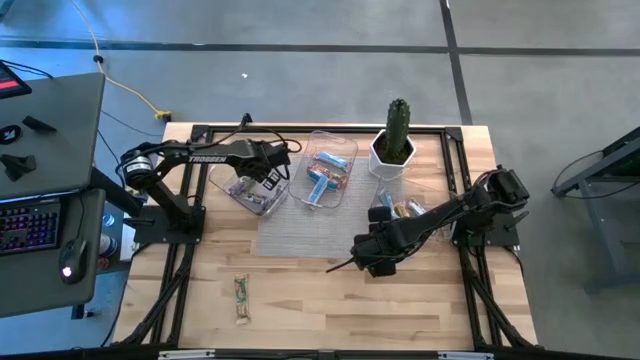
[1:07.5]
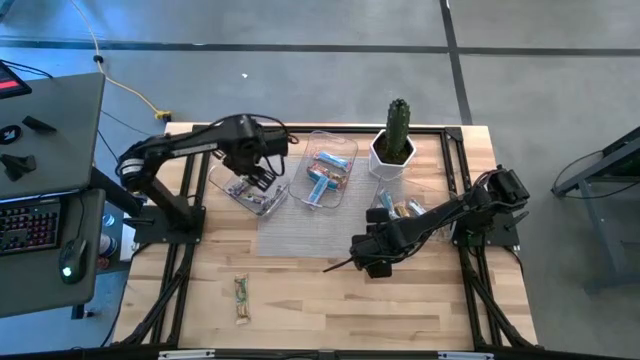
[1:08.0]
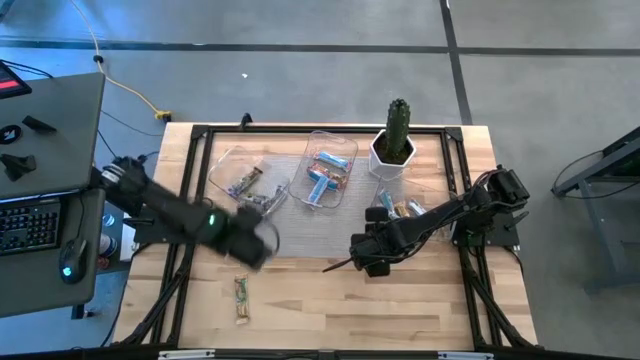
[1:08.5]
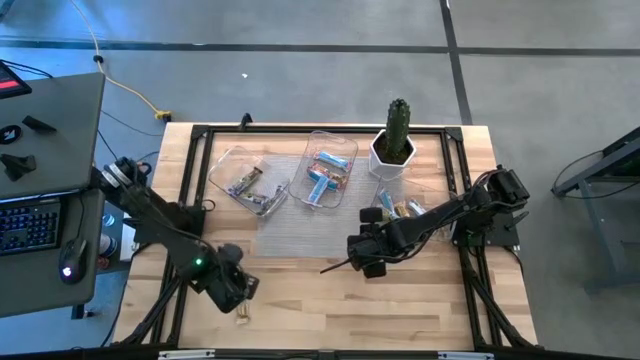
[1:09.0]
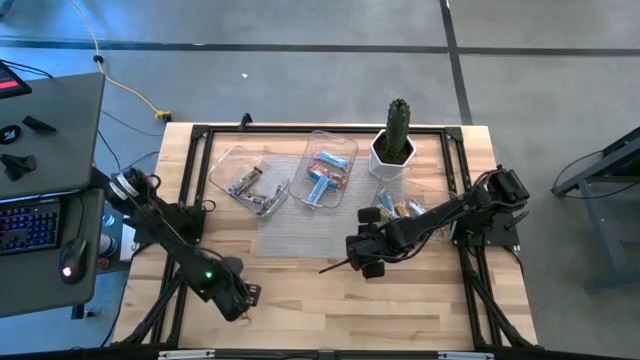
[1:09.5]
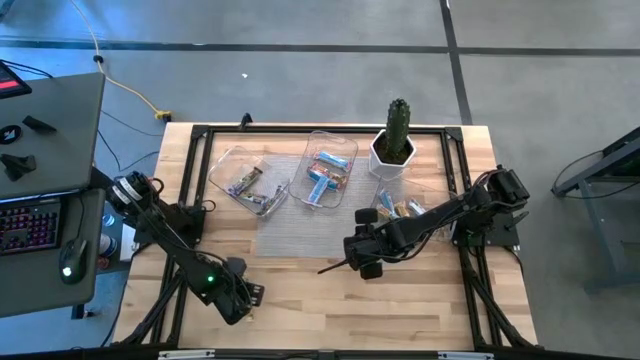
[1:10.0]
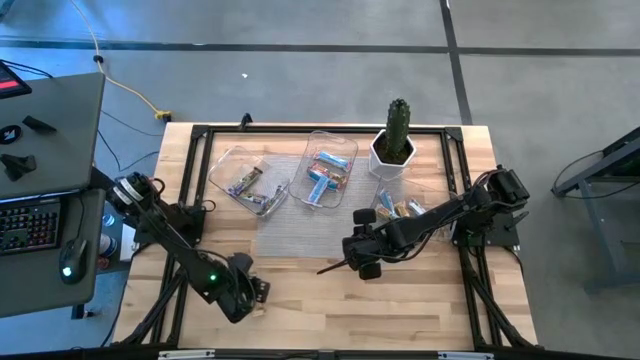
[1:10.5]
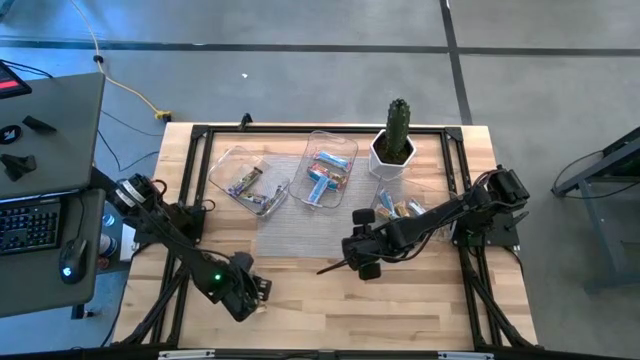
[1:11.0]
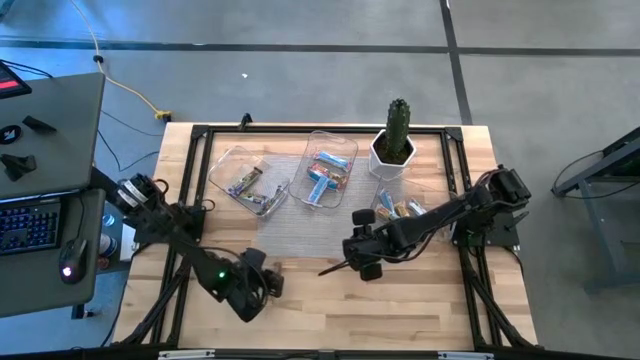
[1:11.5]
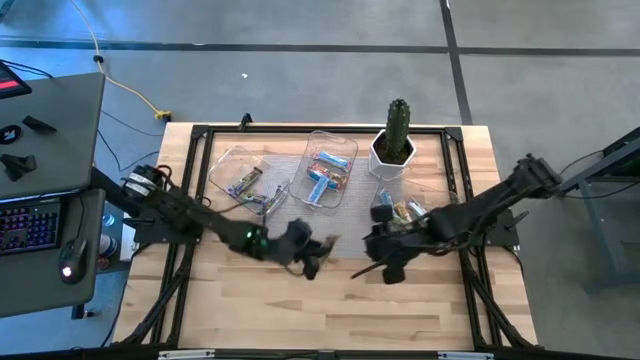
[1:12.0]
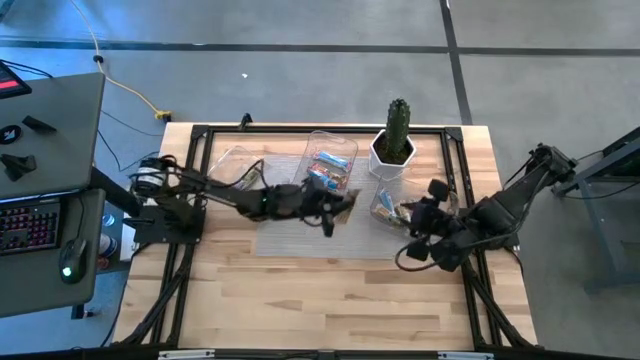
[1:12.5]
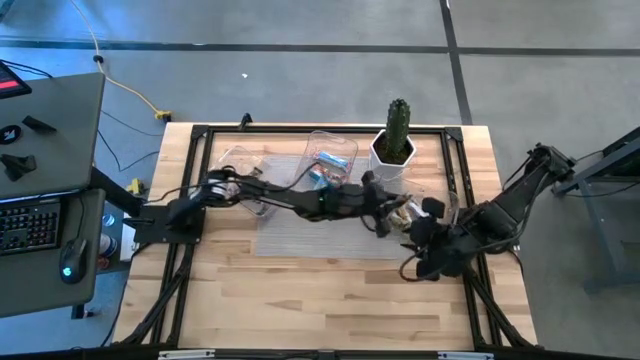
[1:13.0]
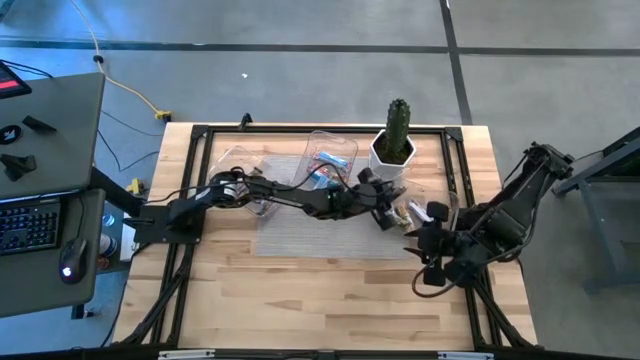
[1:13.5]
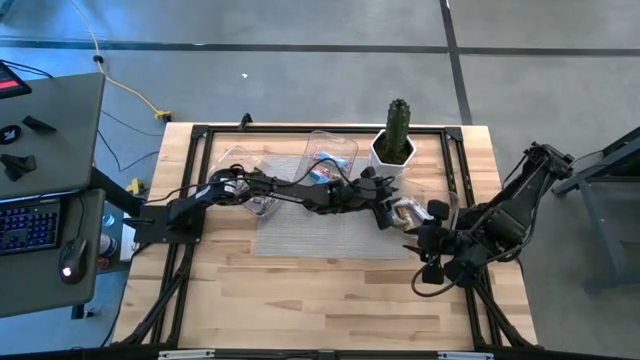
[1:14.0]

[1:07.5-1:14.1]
Task: Pick and place Granola Bars by type
Put the yellow granola bar into the right transparent bin

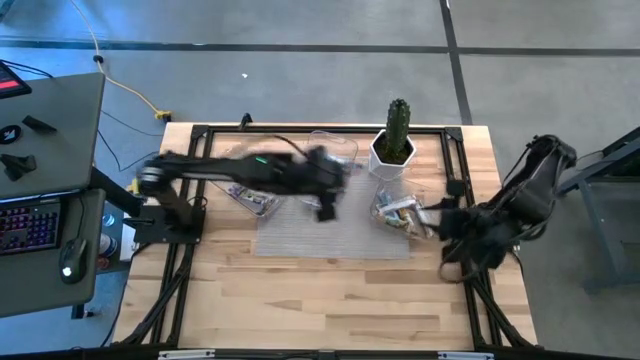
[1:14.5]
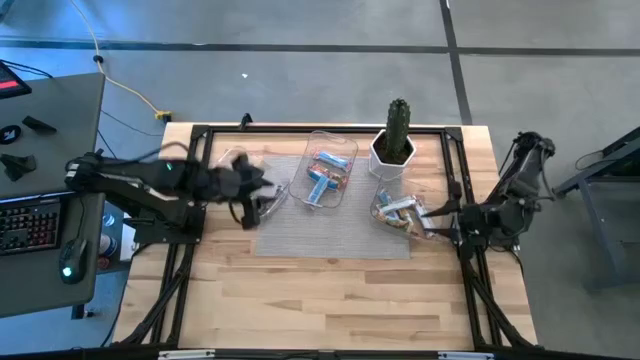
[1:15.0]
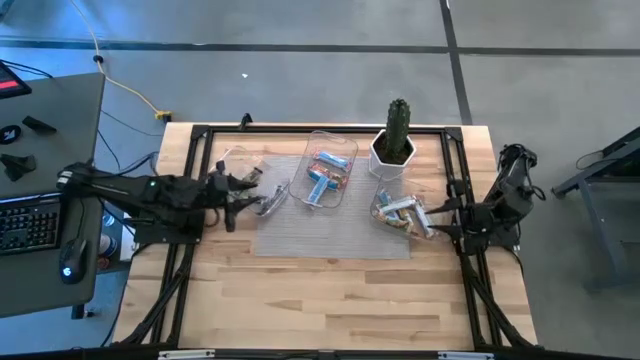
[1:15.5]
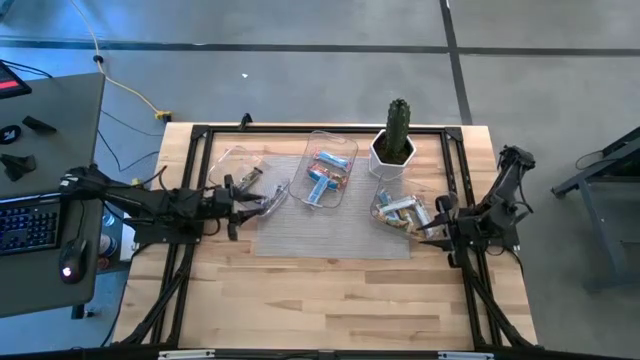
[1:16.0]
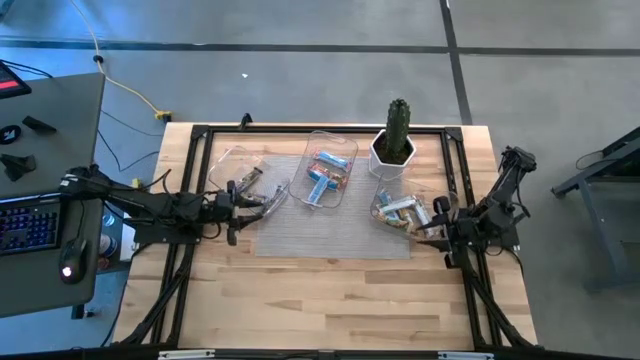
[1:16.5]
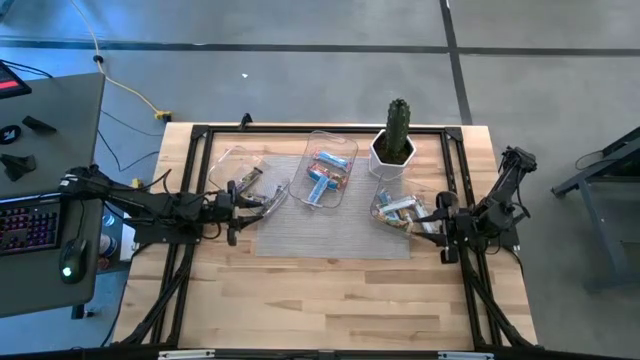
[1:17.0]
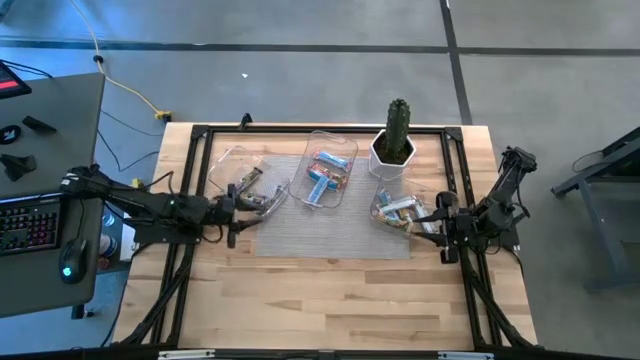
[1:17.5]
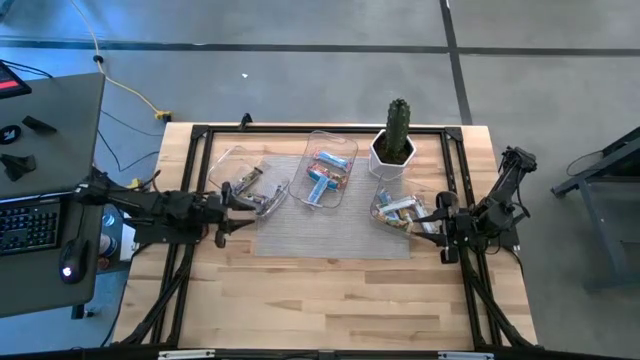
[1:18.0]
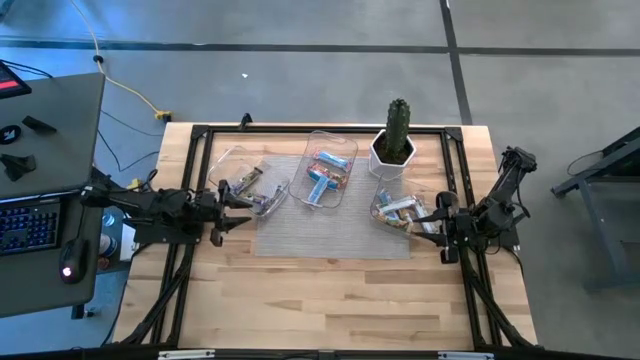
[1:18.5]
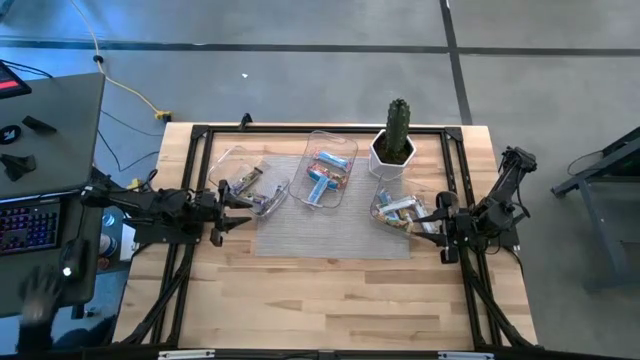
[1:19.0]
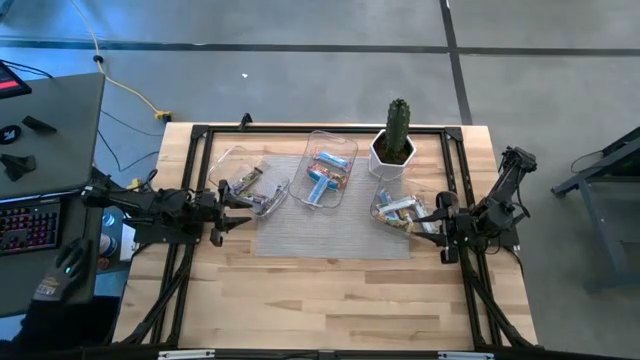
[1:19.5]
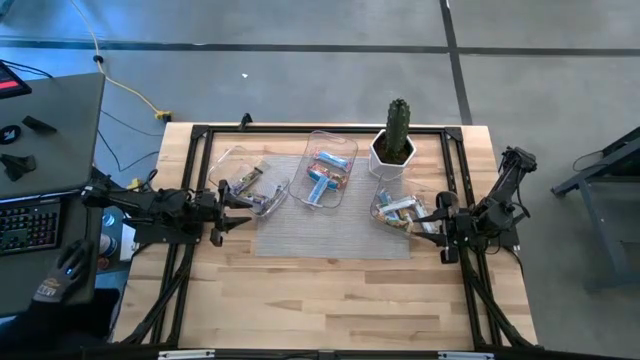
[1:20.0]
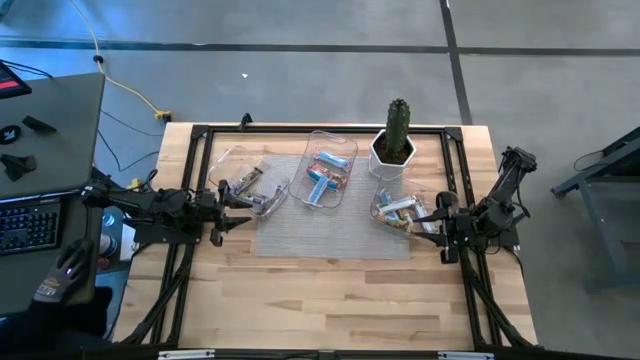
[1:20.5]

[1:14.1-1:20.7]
Return to Home Position

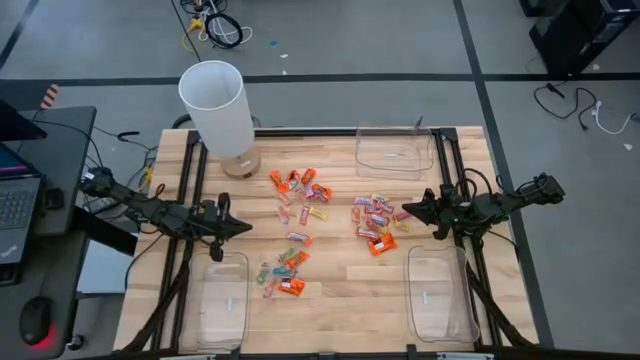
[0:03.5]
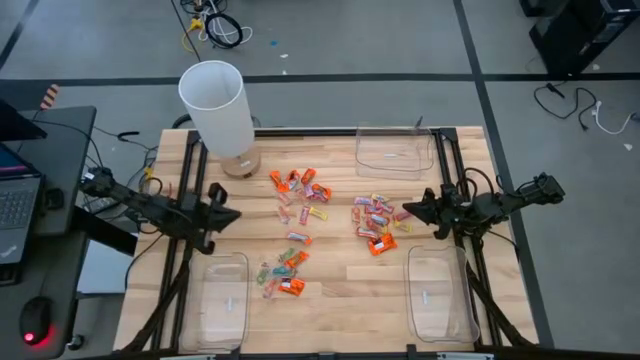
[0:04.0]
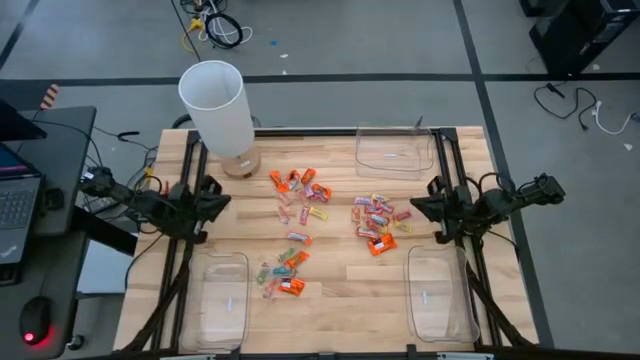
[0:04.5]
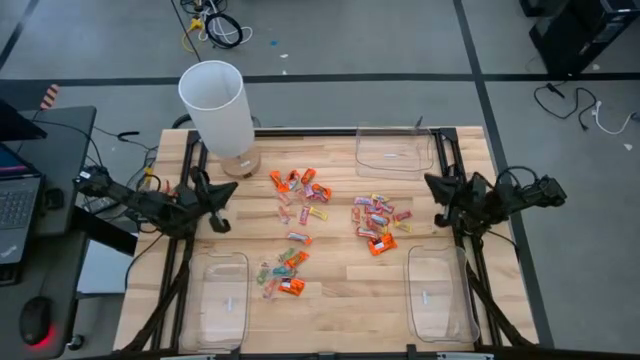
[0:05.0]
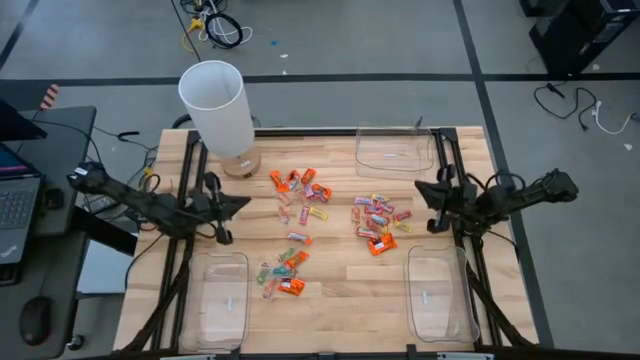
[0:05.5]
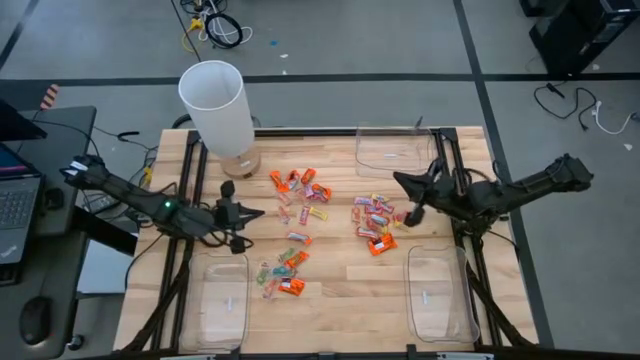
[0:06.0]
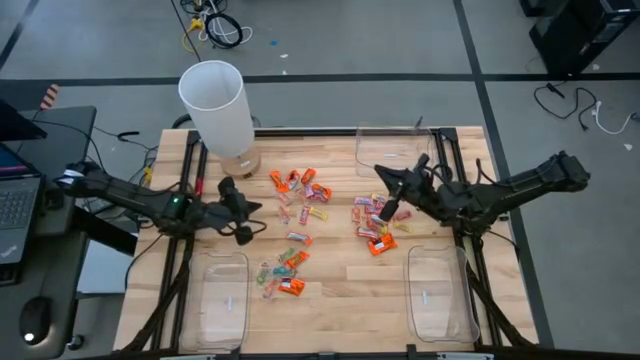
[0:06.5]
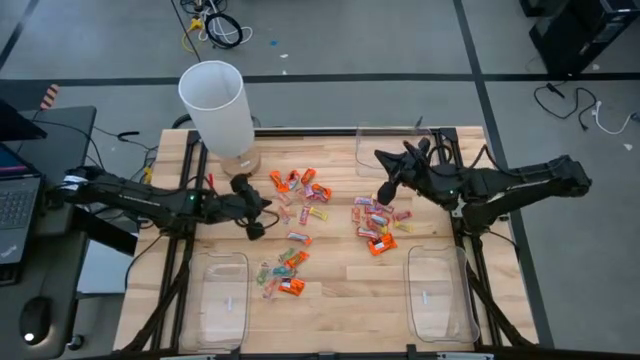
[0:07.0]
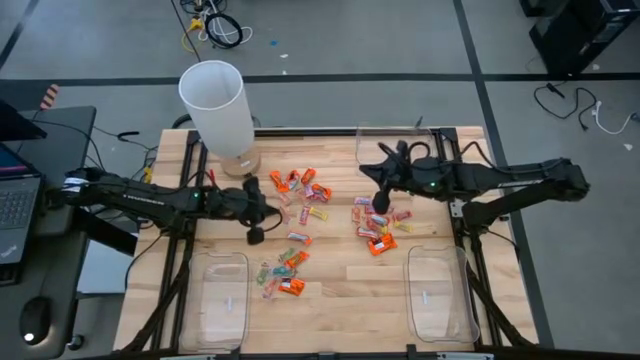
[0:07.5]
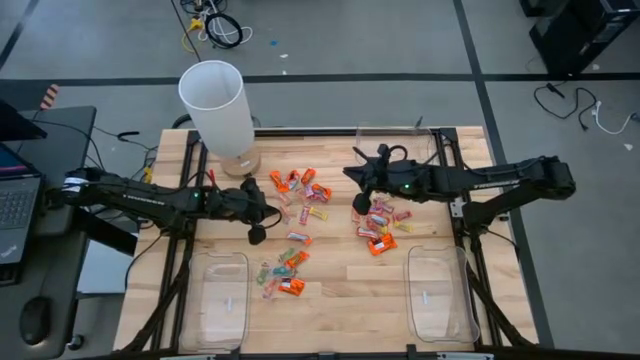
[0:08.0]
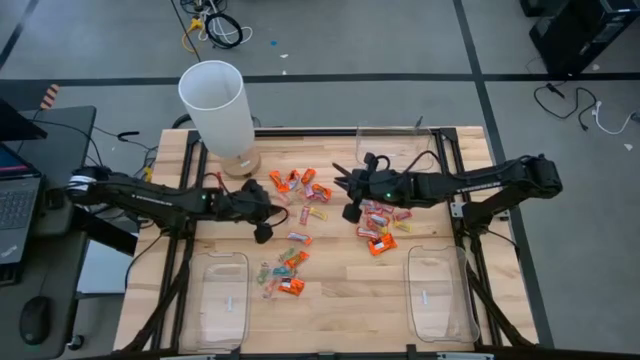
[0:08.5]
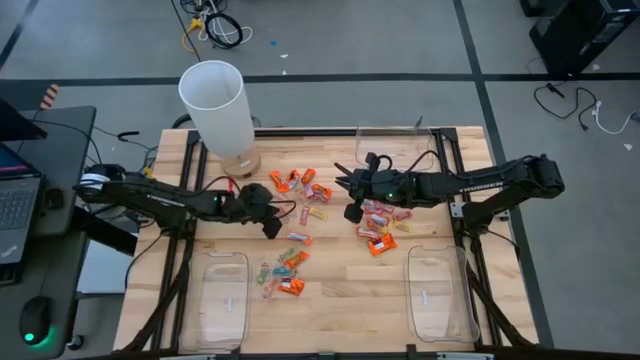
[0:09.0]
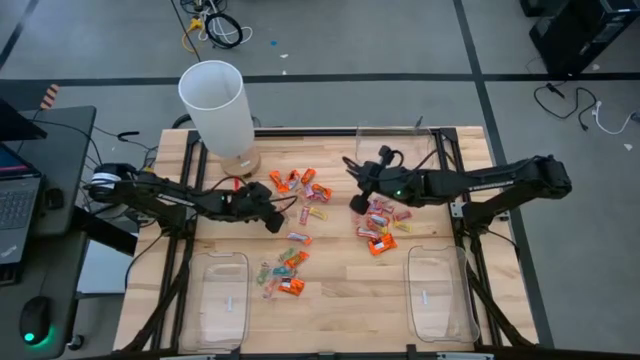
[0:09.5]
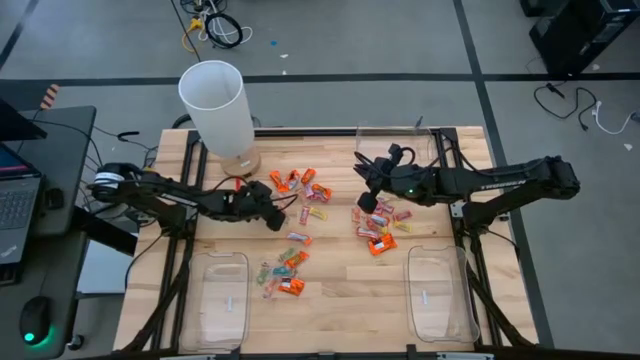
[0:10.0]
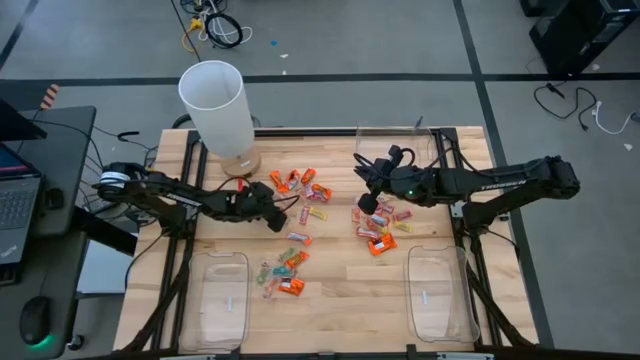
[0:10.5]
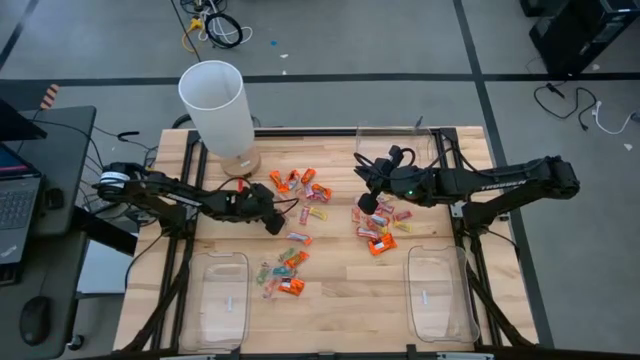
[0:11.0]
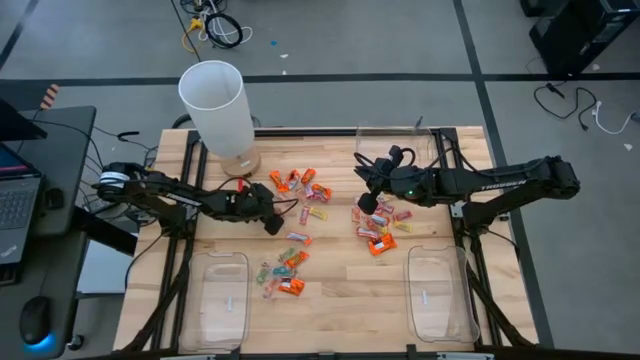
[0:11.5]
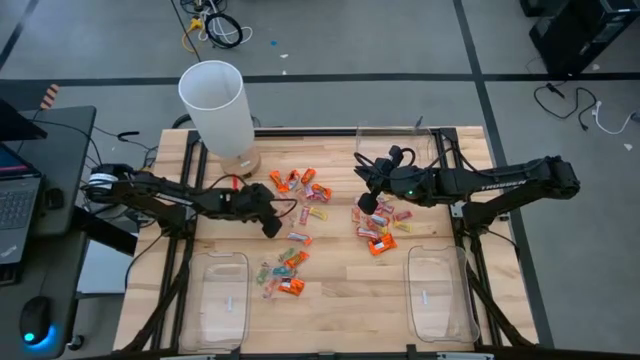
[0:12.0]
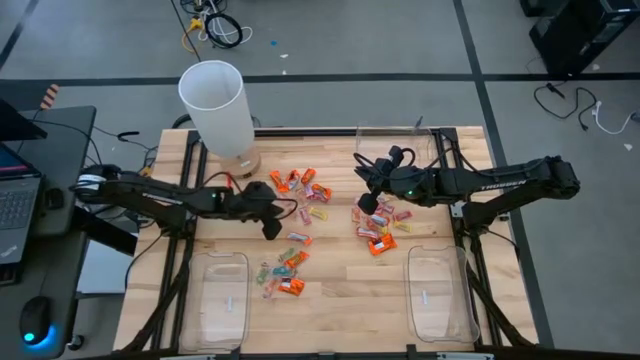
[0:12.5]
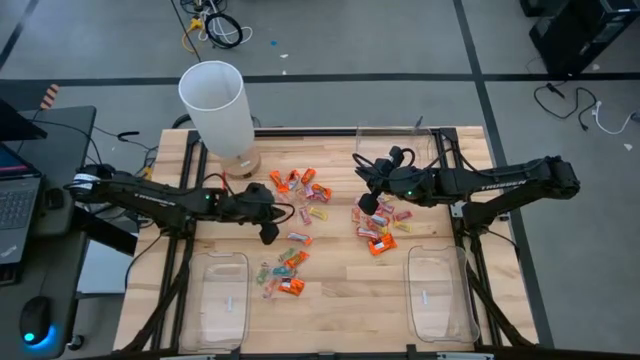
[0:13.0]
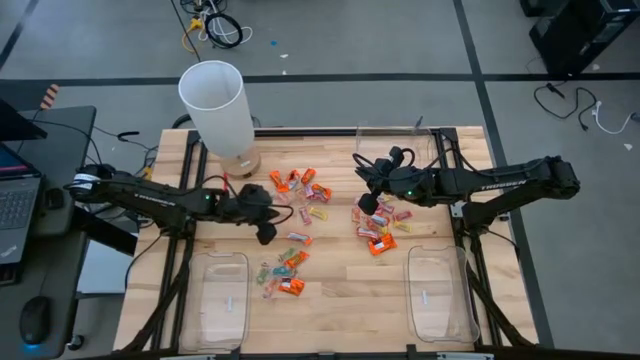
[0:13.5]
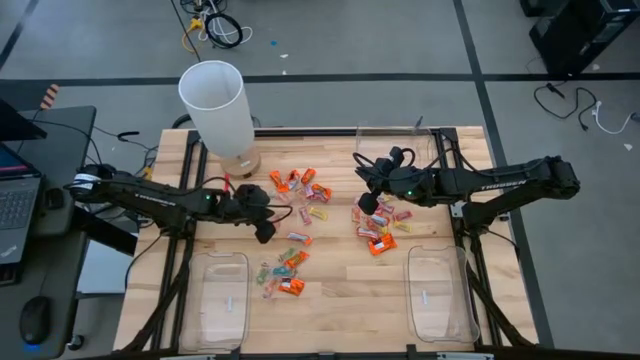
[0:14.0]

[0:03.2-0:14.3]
Task: Sort candy
Put the orange gummy into the bottom left transparent bin
